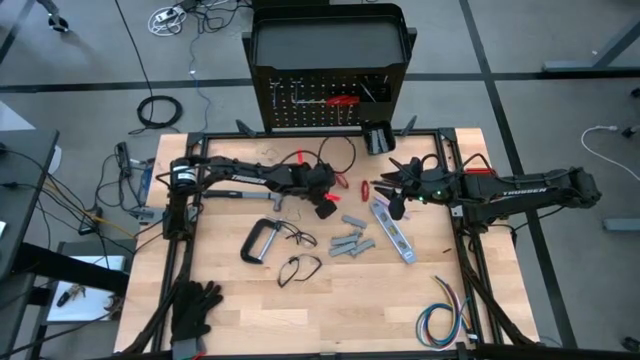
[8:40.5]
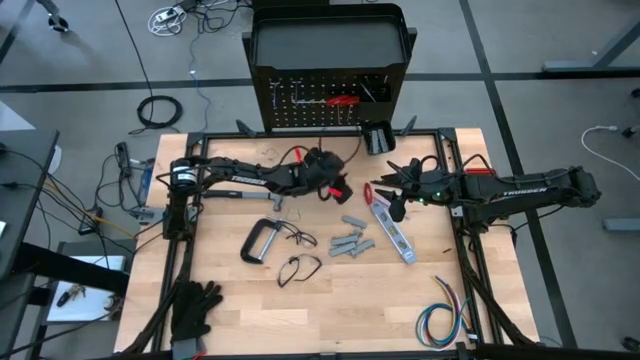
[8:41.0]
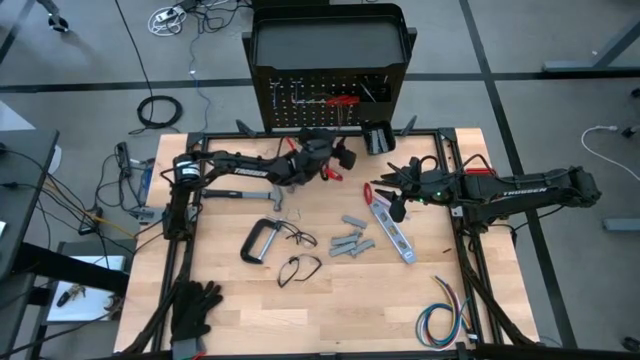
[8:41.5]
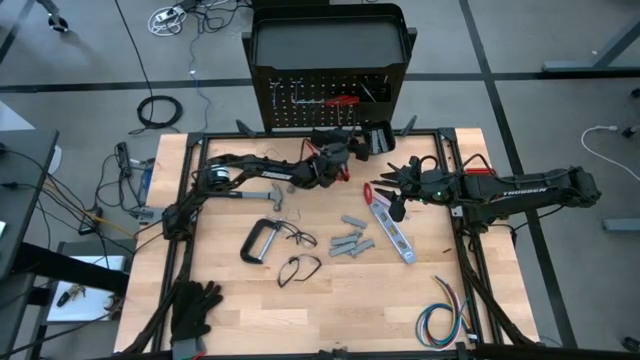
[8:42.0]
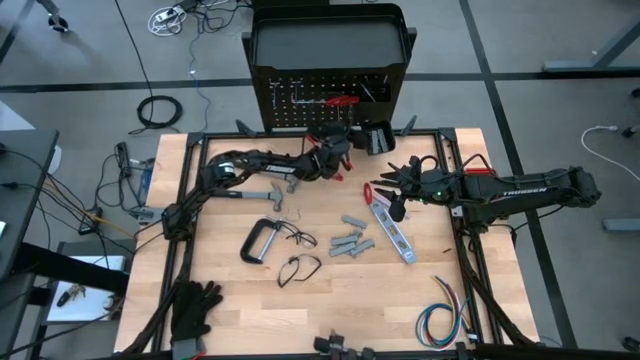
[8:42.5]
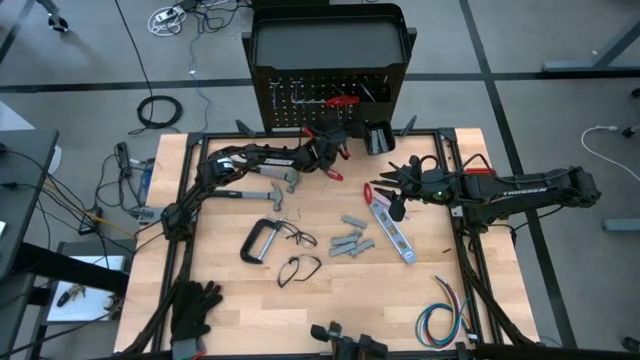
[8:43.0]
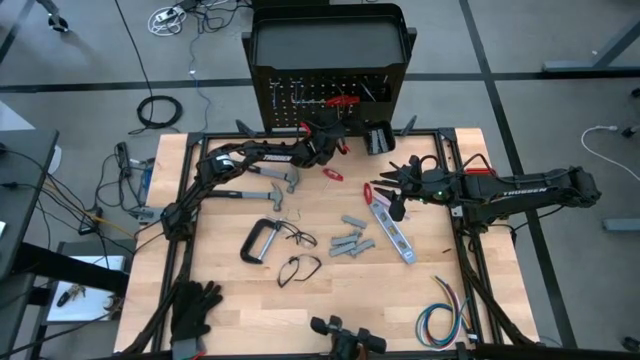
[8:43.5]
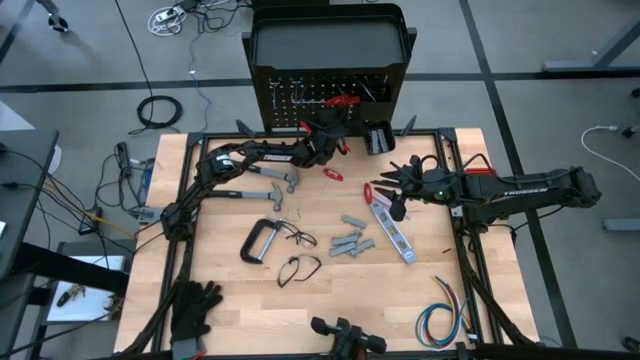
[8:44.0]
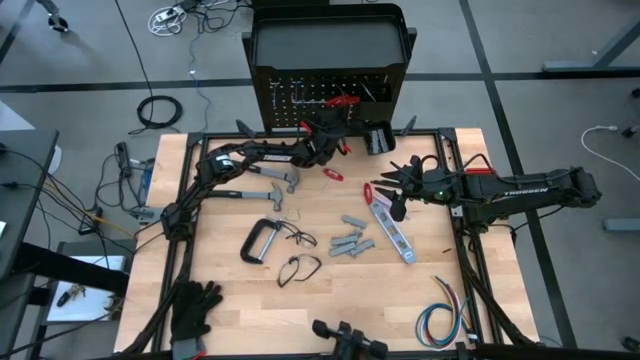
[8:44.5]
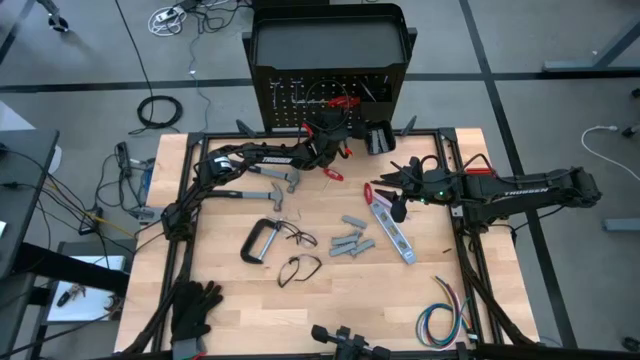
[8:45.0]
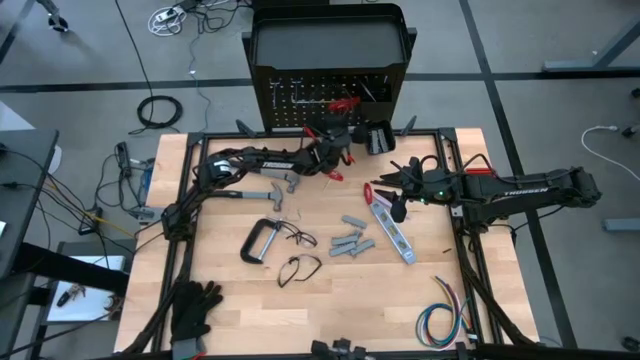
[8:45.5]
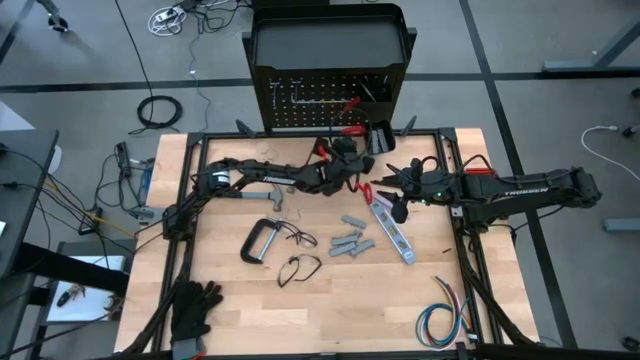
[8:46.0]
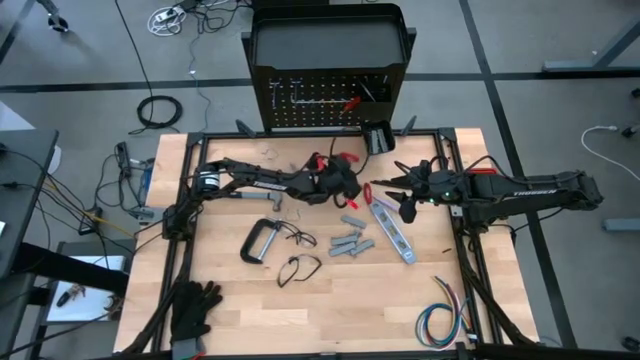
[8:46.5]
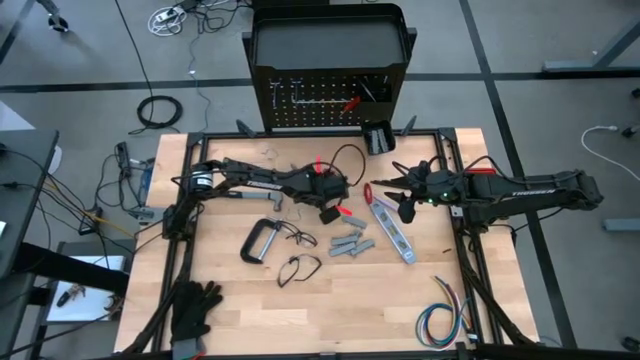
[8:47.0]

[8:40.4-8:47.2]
Task: Hang tools onto peg board
Unhang the T-shaped metric hex key

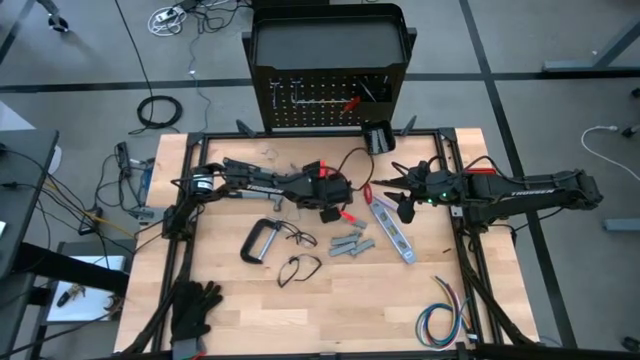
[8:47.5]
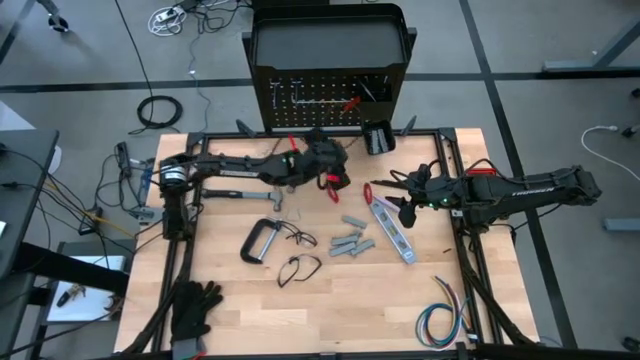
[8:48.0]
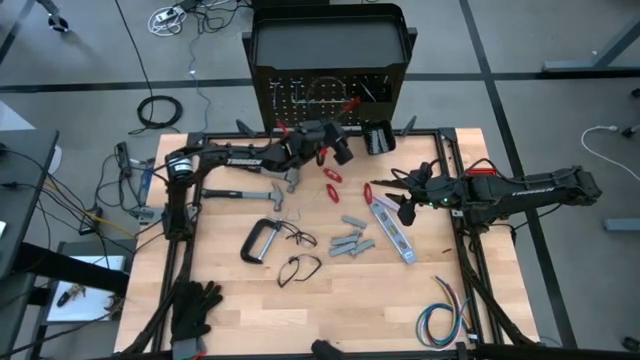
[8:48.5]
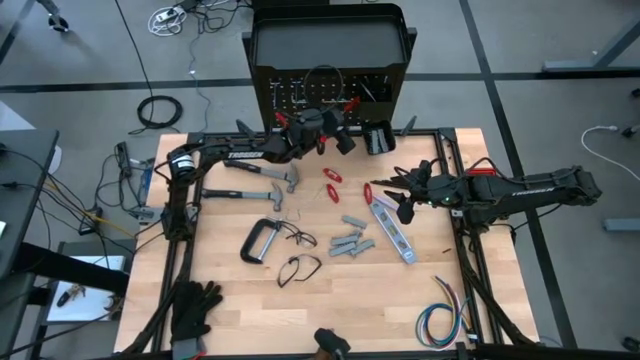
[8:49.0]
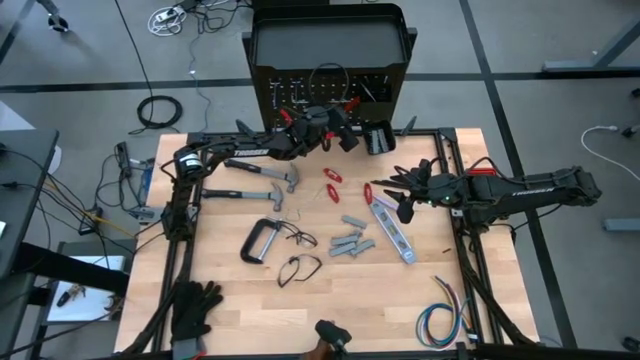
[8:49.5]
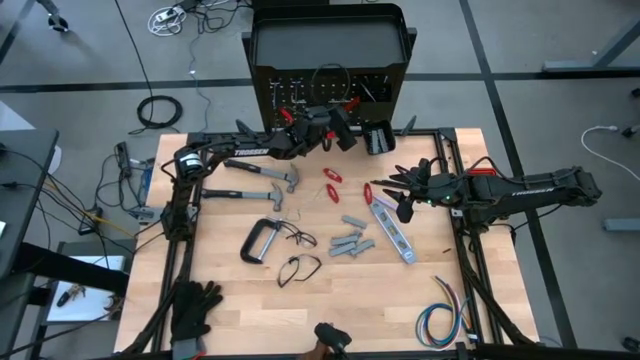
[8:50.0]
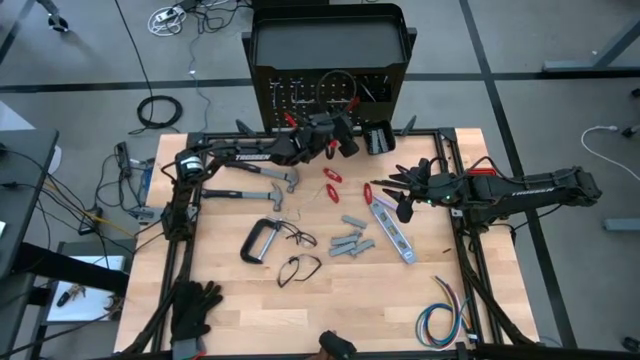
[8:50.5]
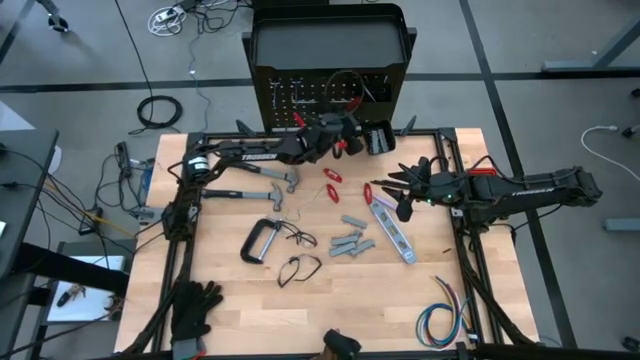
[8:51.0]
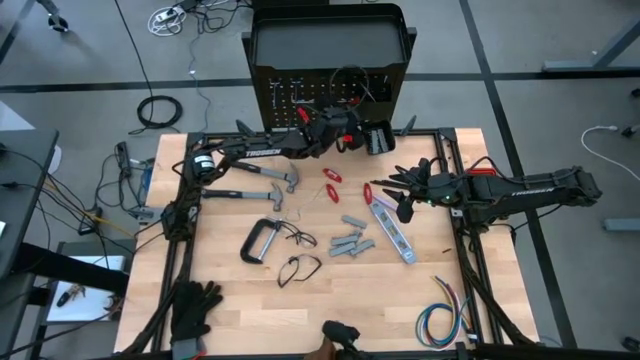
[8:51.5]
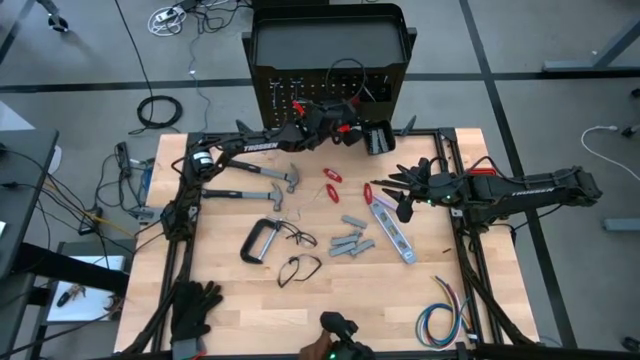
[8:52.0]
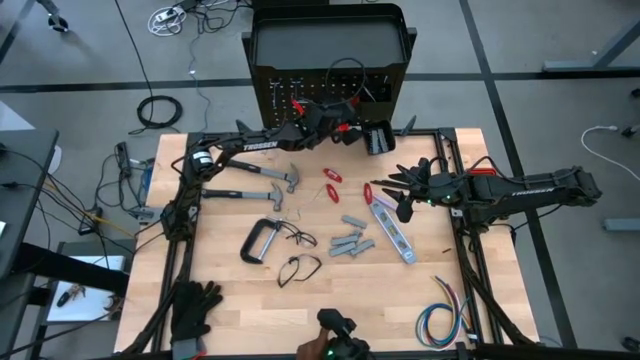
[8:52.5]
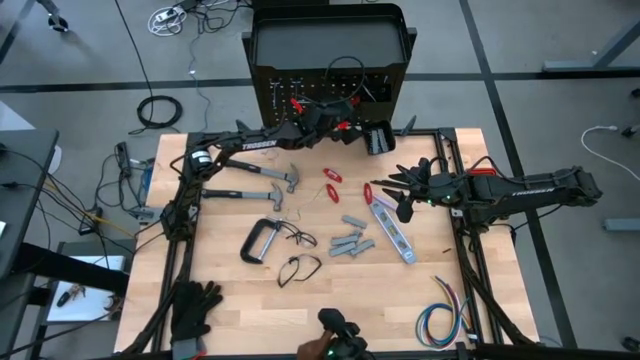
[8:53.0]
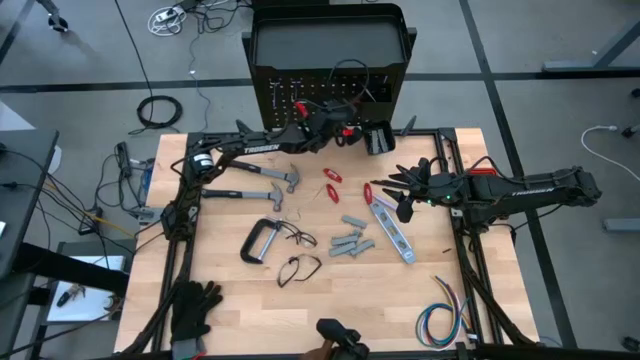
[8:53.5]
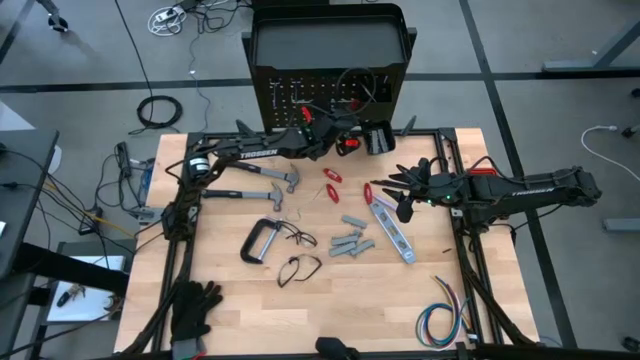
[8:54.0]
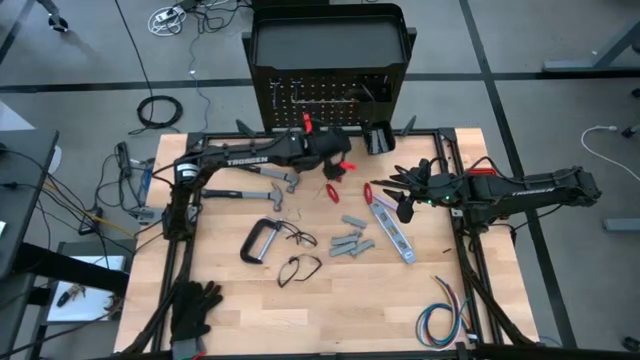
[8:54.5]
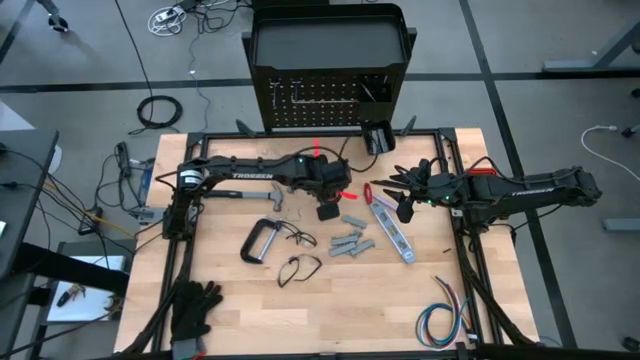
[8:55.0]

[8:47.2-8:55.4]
Unhang the T-shaped metric hex key

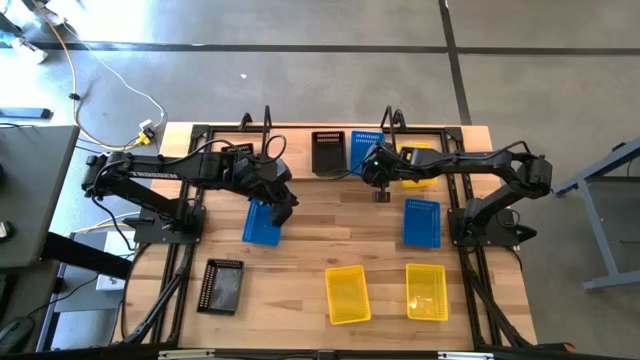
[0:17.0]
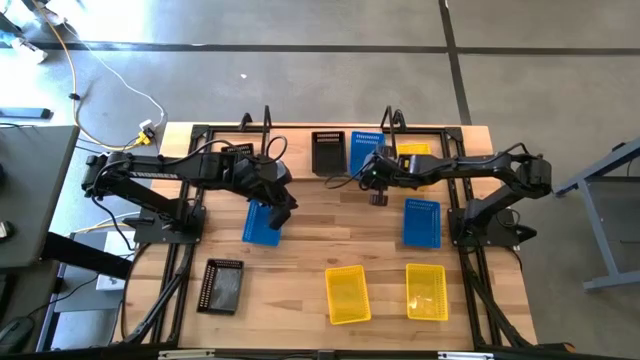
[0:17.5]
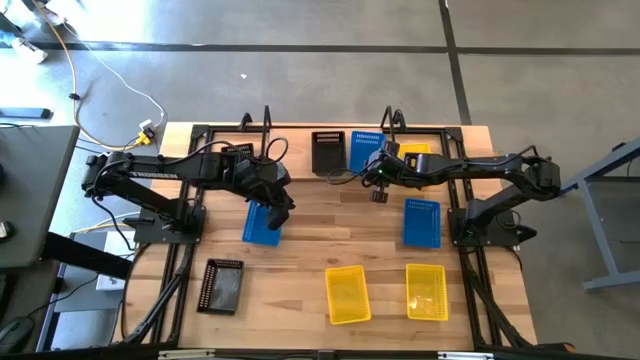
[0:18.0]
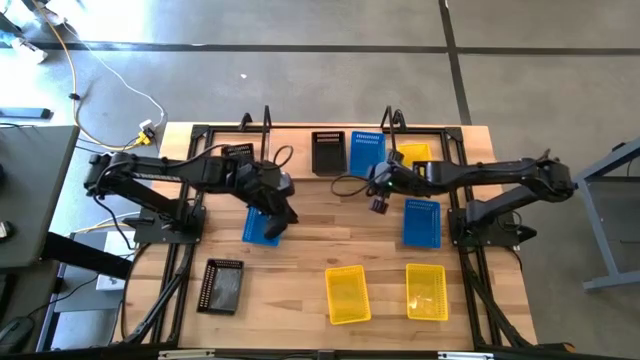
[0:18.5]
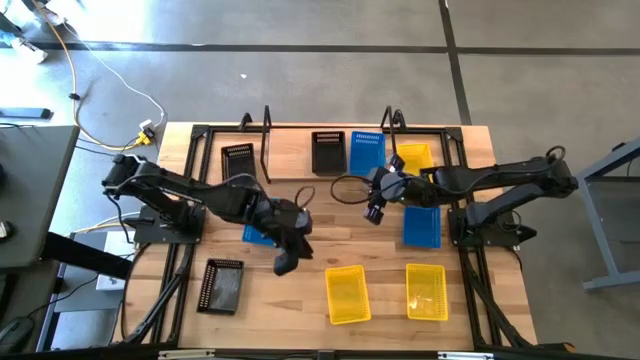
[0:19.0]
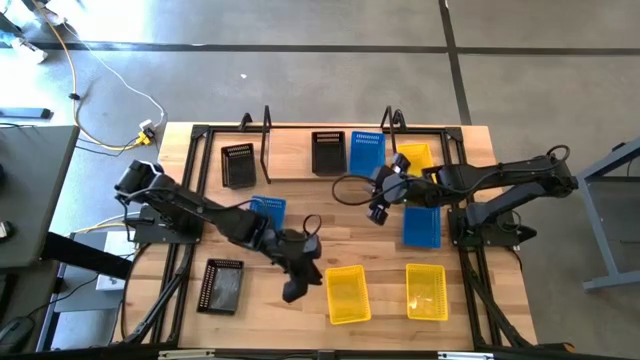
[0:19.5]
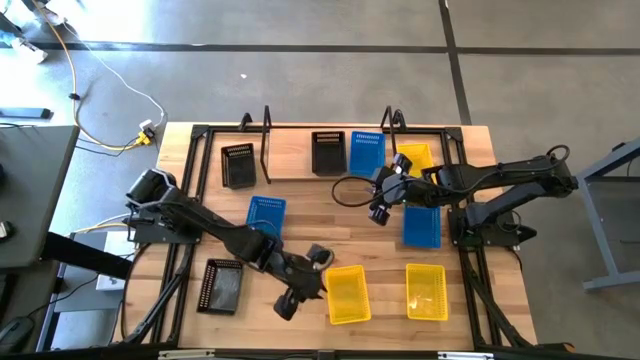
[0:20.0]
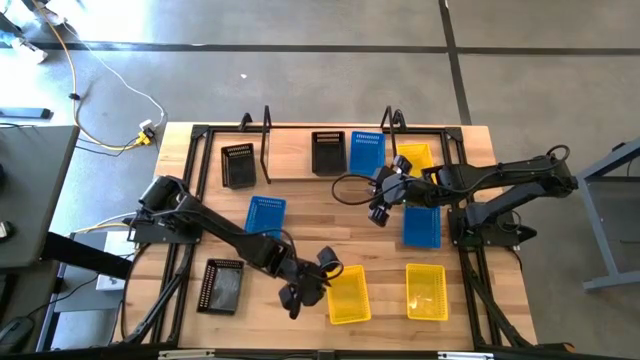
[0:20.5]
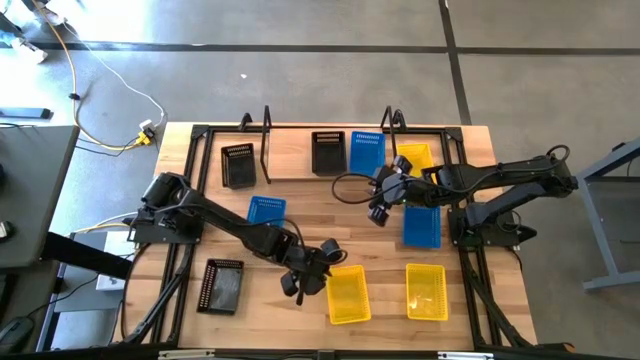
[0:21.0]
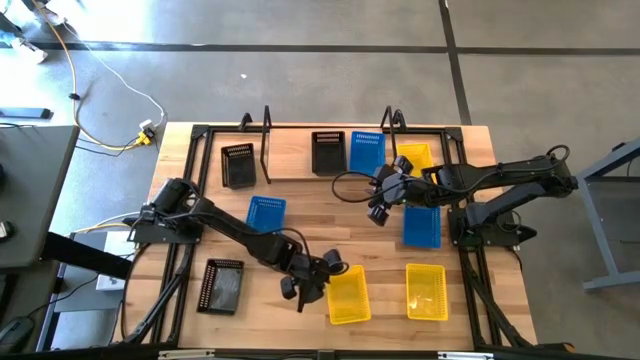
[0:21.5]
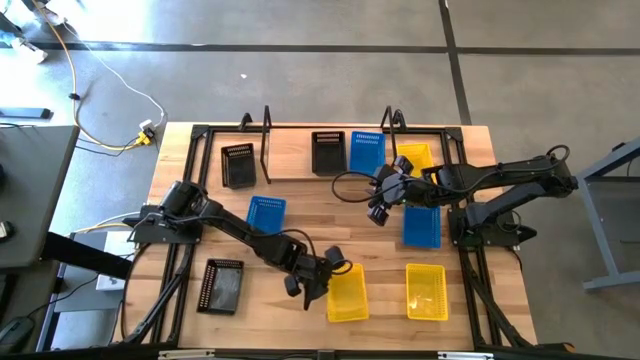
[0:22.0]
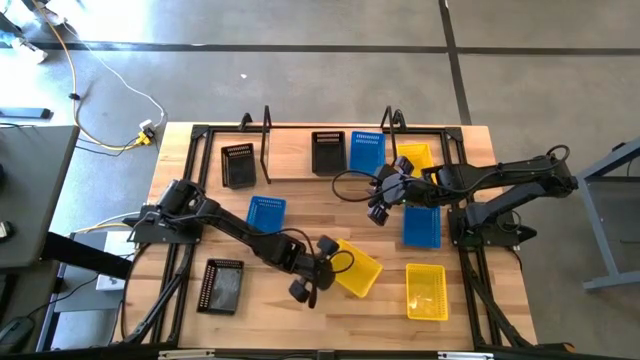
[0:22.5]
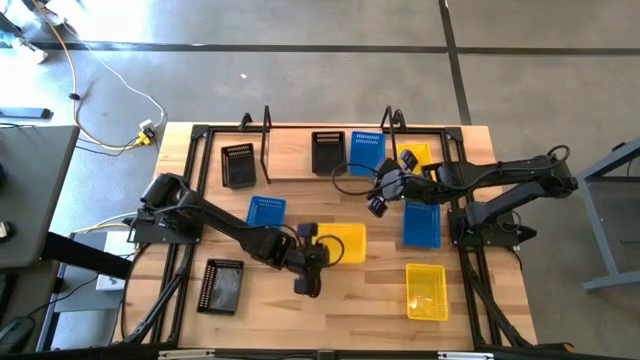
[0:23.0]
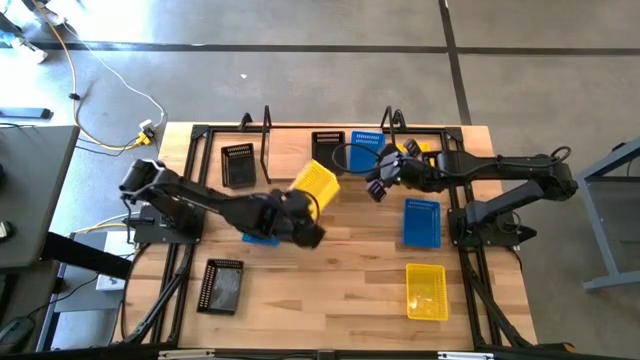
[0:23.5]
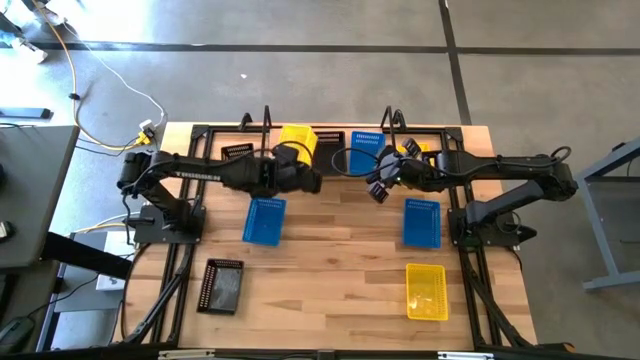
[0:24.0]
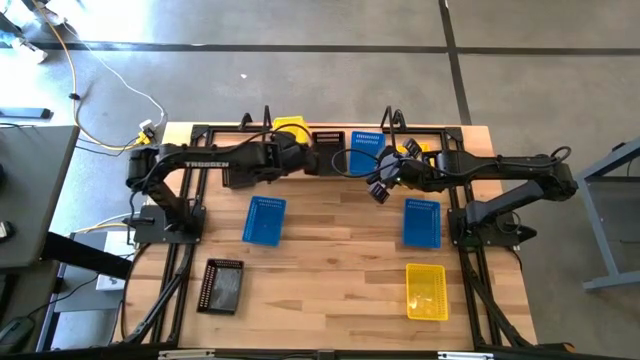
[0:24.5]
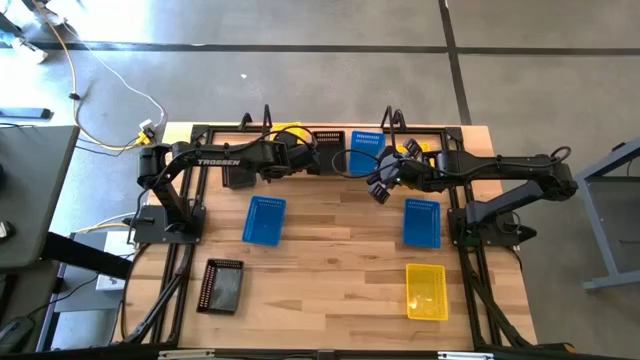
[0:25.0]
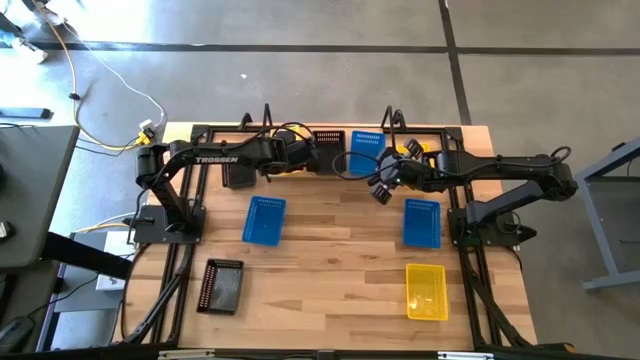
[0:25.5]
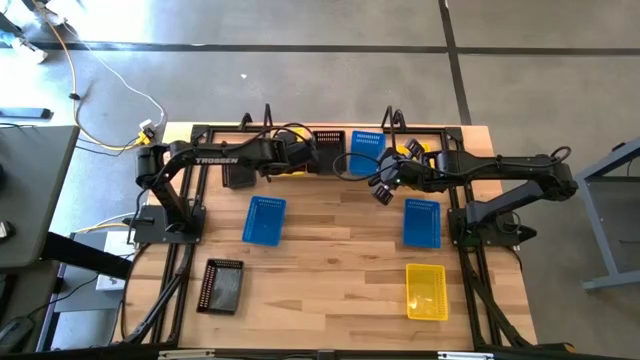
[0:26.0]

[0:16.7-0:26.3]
Task: Stack baskets on shelf by color
Put the bottom left yellow bin on the shelf
